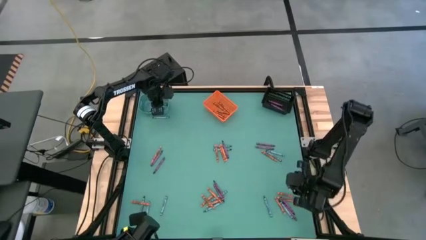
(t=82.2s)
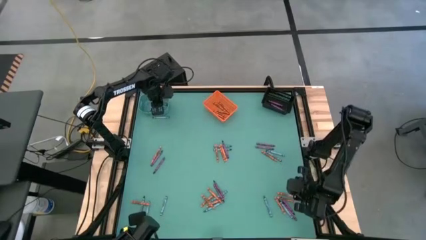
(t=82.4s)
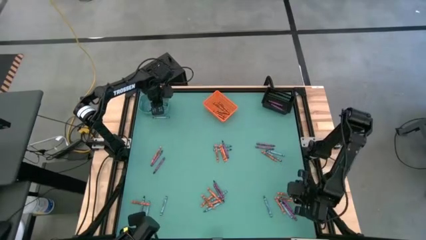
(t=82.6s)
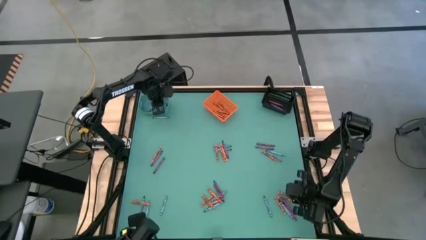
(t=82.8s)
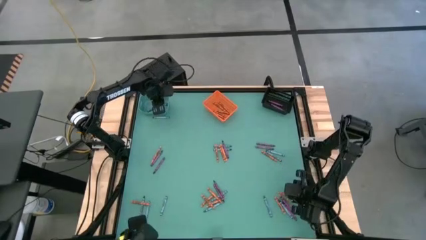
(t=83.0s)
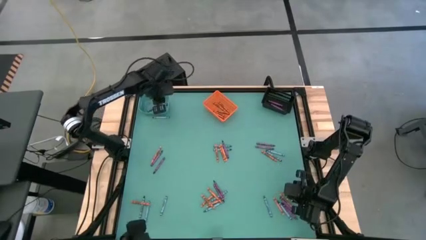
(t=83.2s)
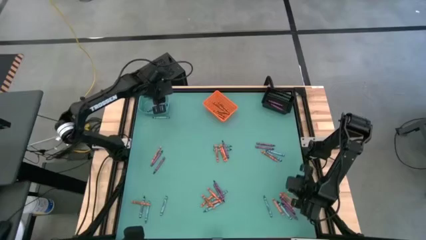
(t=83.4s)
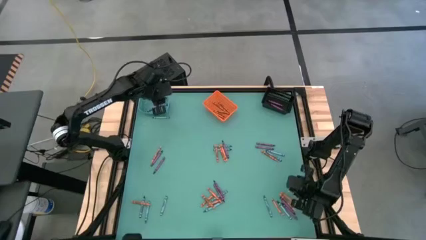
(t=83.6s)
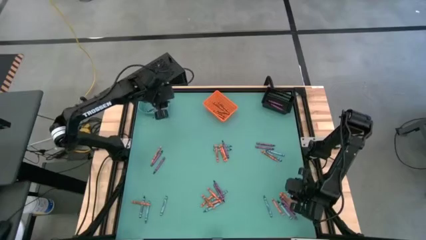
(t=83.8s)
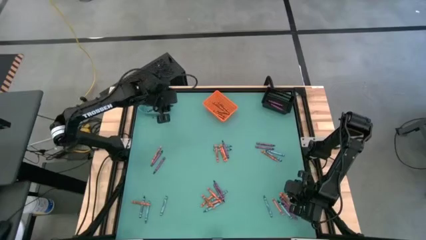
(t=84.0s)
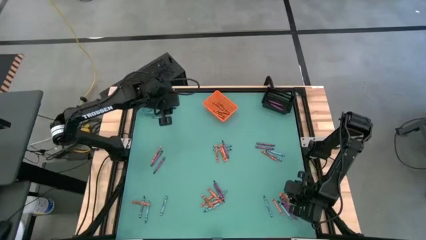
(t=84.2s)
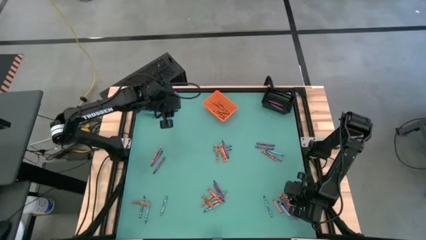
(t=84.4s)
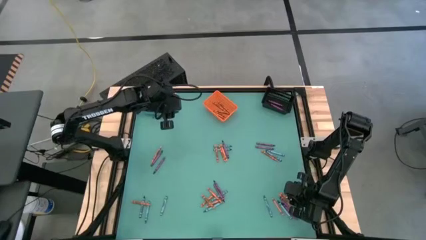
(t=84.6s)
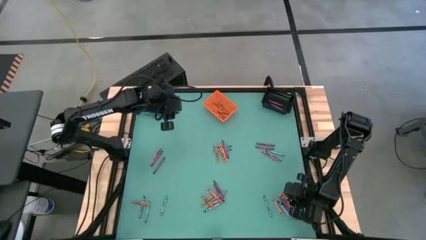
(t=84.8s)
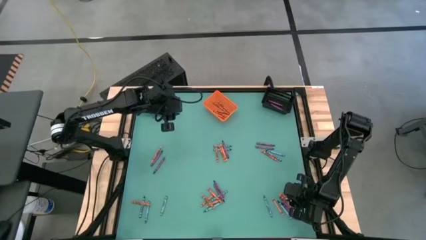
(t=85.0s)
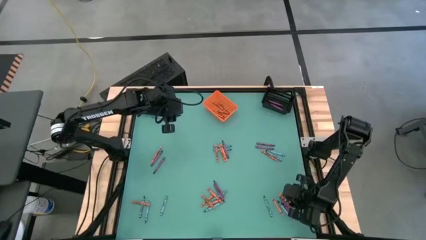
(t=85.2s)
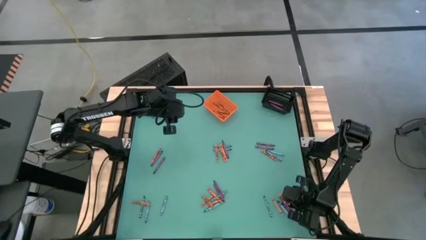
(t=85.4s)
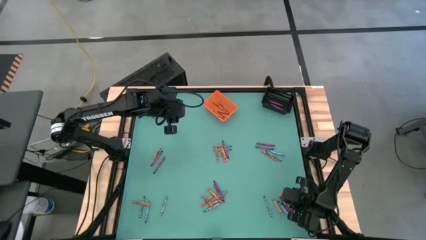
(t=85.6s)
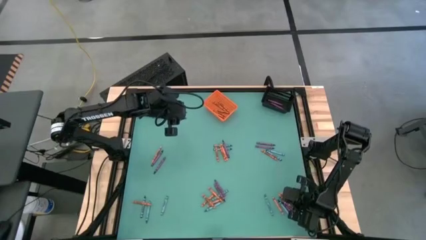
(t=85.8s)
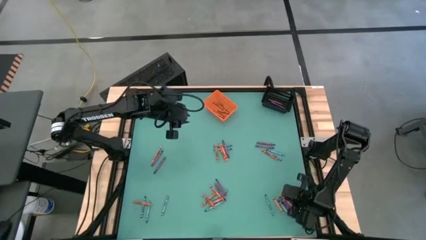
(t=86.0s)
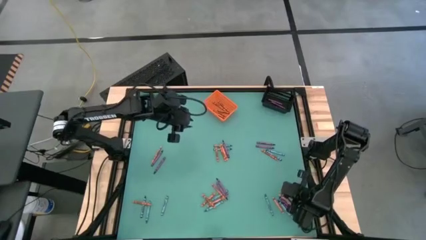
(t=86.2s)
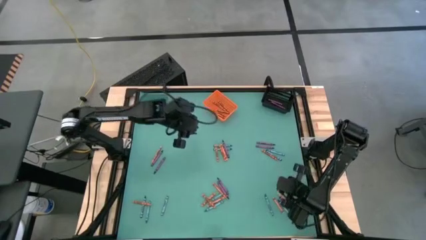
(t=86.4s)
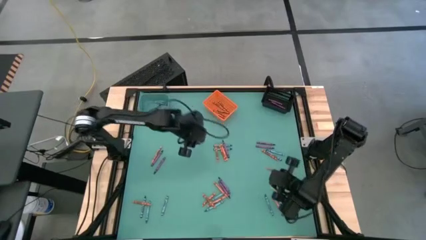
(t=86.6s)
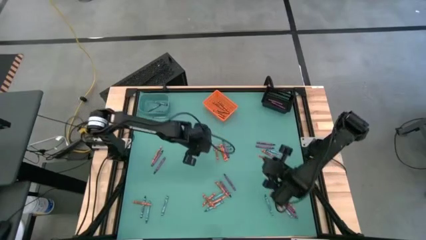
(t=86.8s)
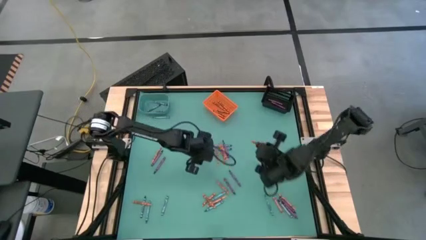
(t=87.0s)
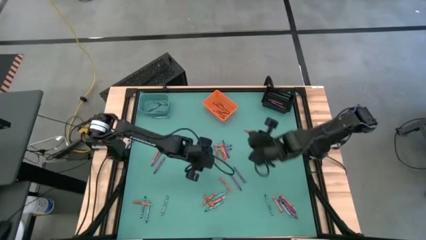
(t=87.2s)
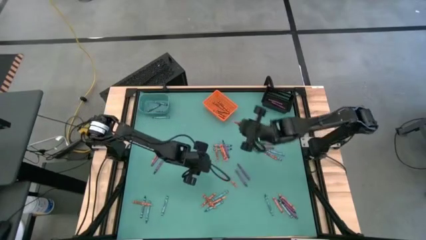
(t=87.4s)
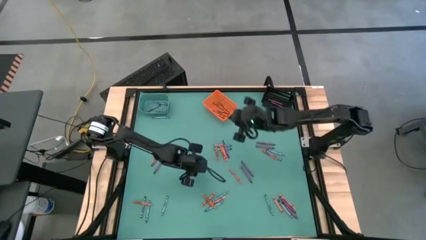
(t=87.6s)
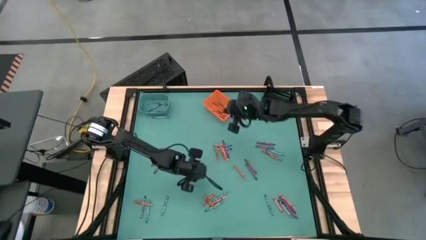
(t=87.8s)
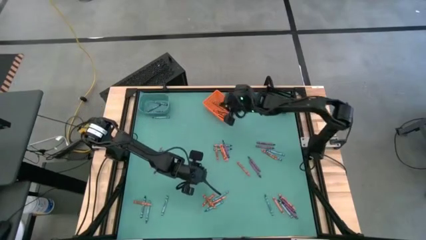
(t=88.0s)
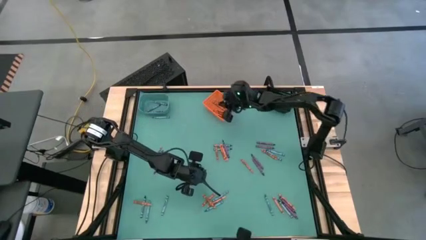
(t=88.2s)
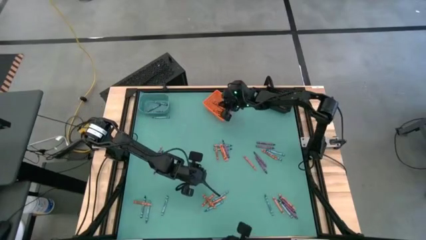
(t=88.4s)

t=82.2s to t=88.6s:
Task: Sort crayons
Put the orange crayon into the orange bin

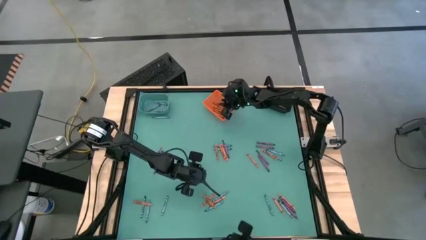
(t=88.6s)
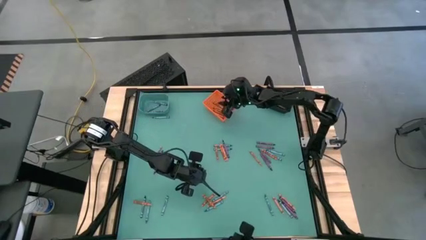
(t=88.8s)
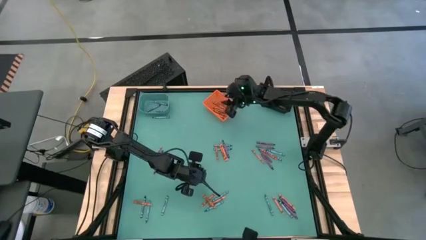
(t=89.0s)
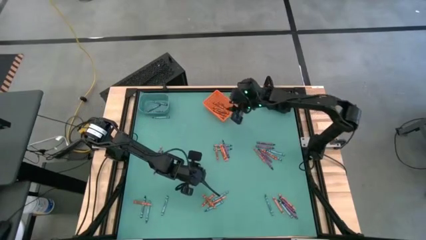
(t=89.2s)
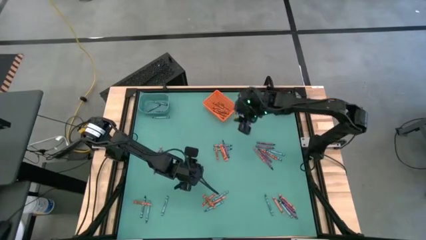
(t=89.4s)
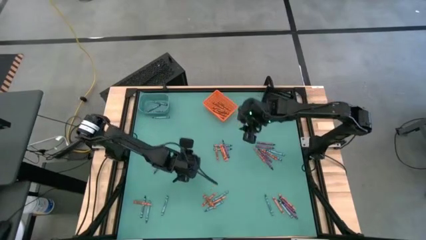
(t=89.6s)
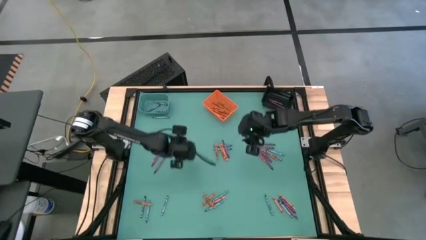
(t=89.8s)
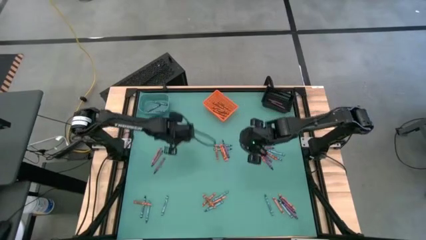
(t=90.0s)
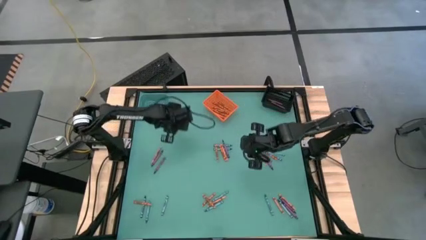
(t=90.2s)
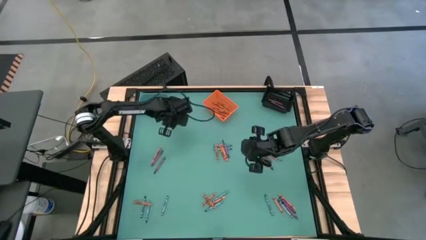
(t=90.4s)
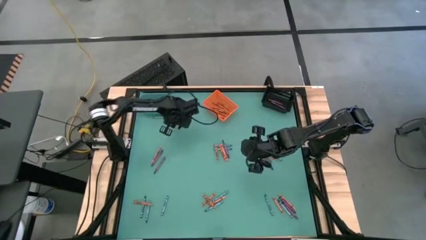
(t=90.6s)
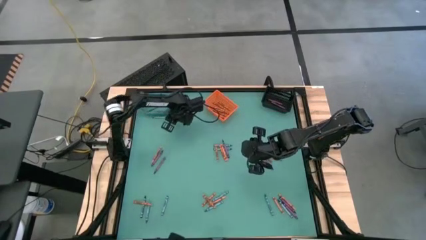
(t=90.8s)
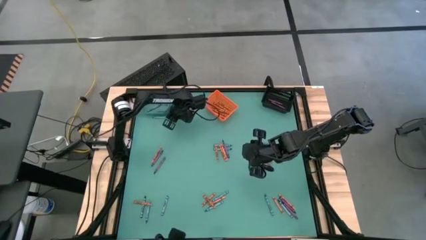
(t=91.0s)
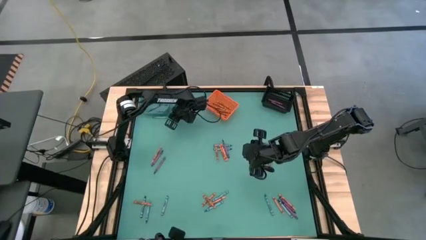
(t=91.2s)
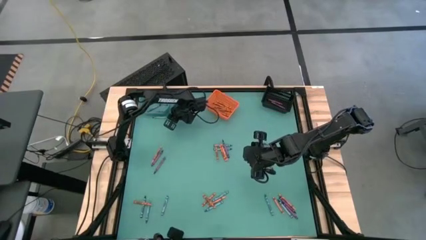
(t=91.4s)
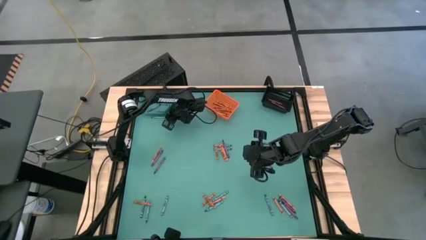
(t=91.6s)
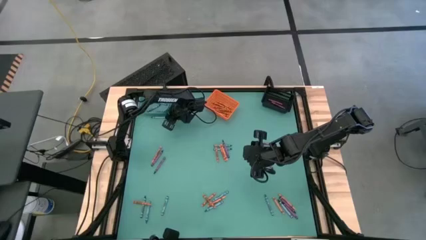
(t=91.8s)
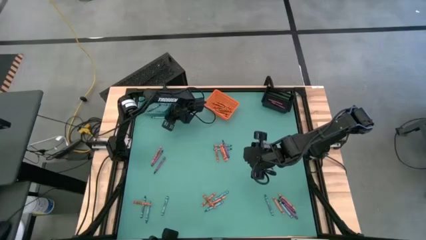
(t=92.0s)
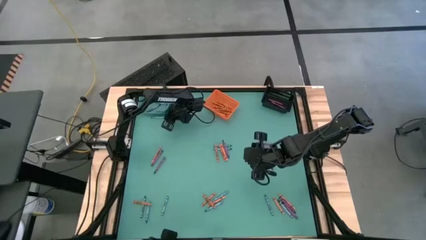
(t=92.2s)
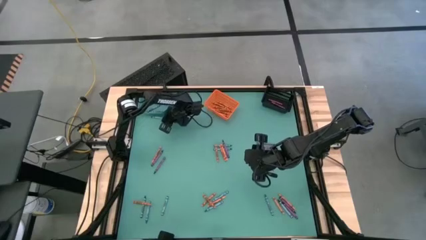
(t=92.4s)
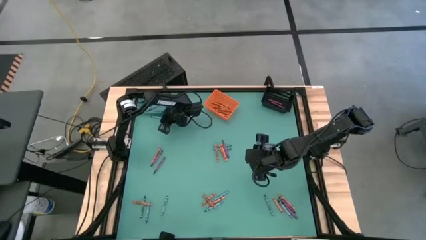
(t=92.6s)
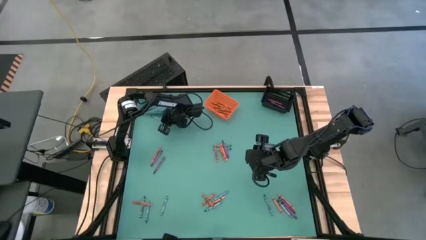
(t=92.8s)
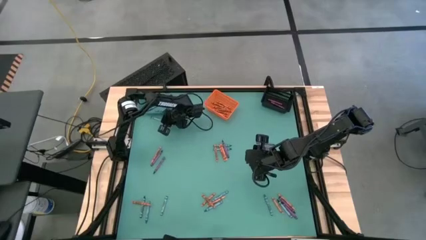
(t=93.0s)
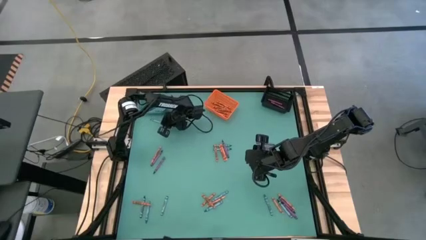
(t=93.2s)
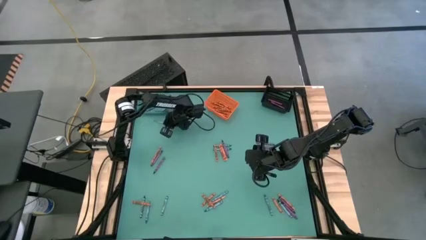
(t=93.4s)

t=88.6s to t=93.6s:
Put the blue crayon into the blue bin

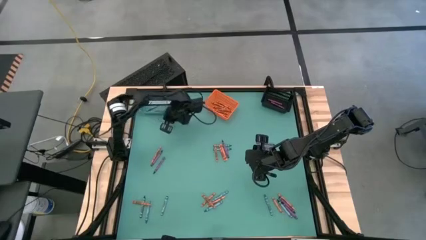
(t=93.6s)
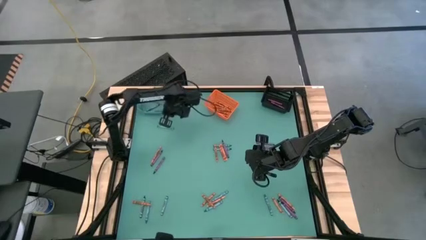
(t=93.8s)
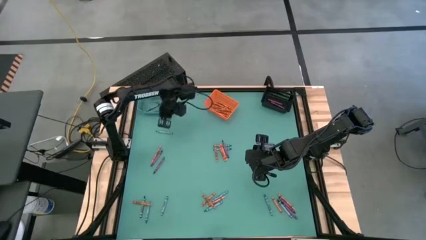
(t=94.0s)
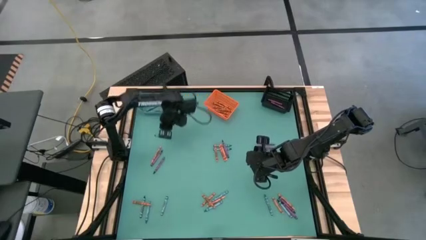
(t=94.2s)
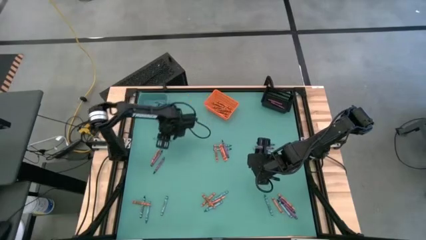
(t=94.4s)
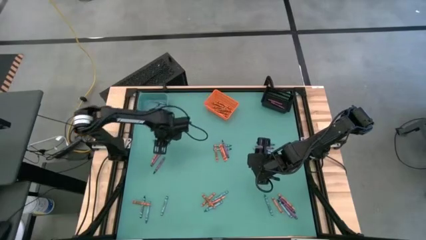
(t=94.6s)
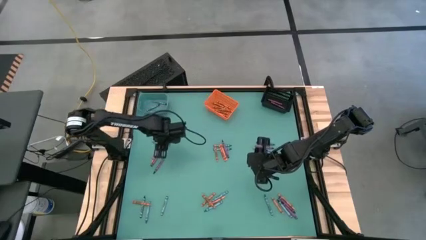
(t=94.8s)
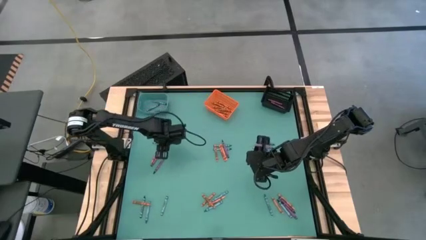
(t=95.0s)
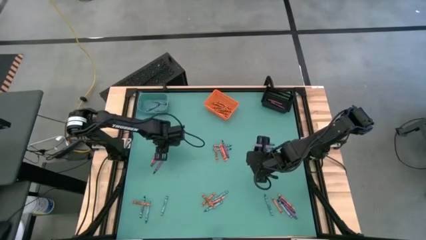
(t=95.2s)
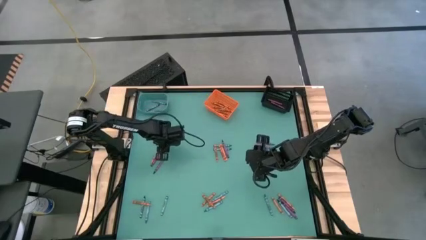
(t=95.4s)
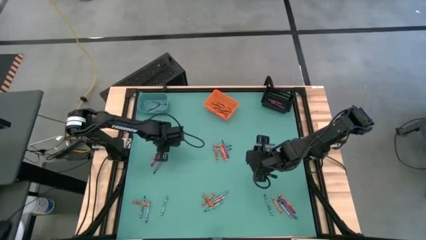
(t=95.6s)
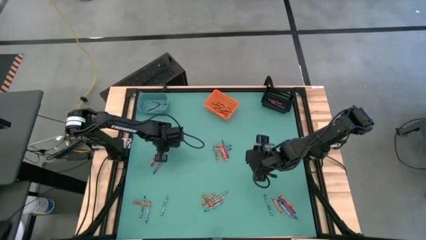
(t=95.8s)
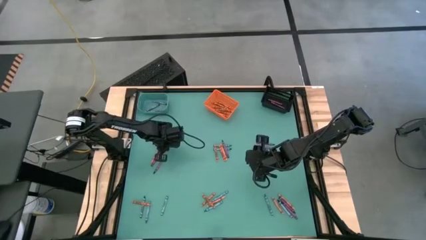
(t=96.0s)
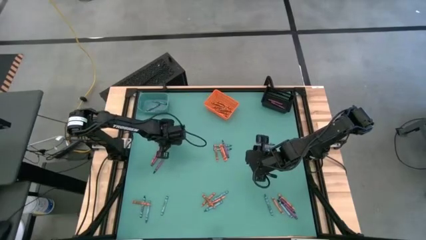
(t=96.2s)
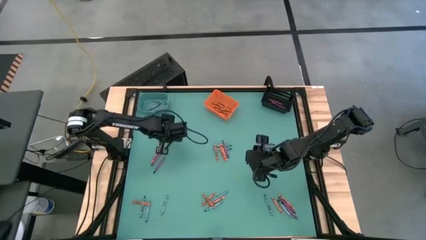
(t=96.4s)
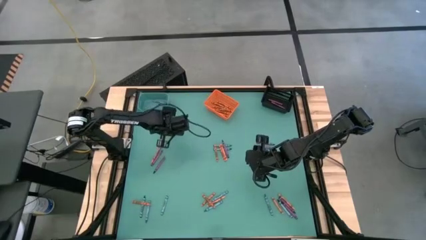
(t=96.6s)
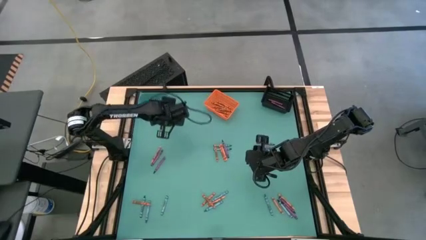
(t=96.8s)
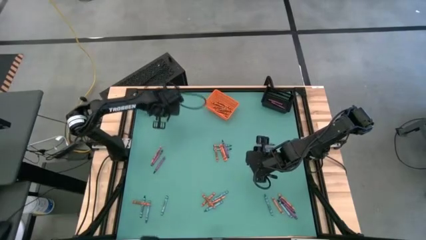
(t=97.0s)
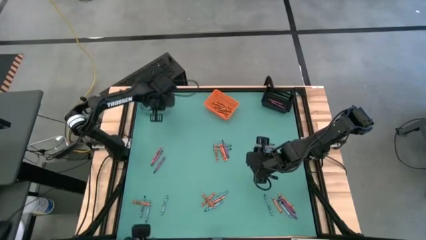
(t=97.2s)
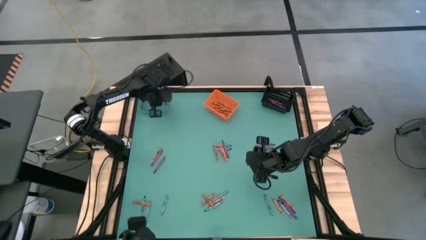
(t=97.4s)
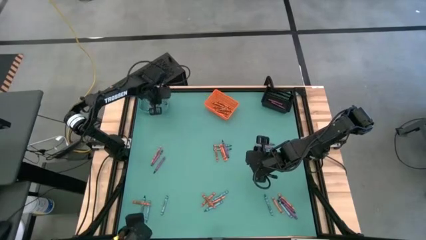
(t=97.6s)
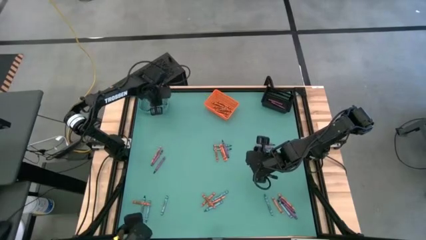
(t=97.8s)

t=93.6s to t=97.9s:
Put the blue crayon into the blue bin
